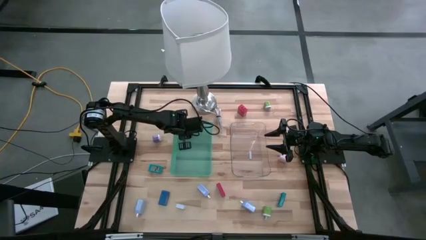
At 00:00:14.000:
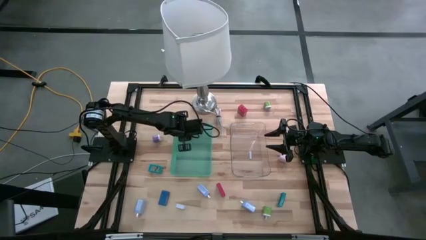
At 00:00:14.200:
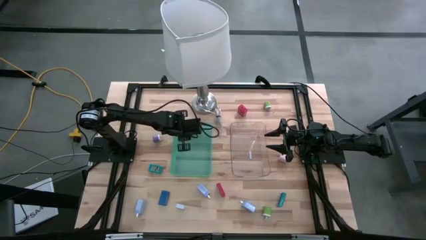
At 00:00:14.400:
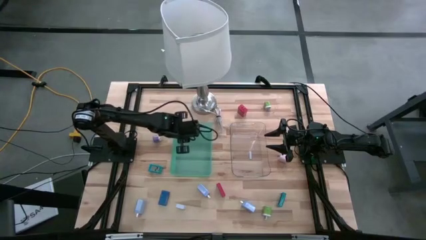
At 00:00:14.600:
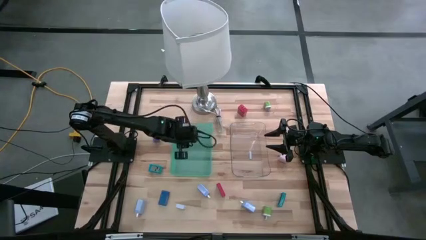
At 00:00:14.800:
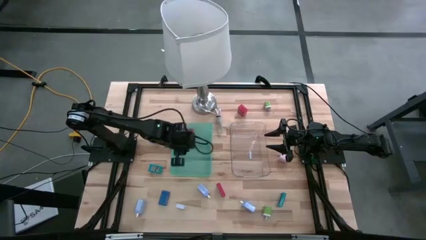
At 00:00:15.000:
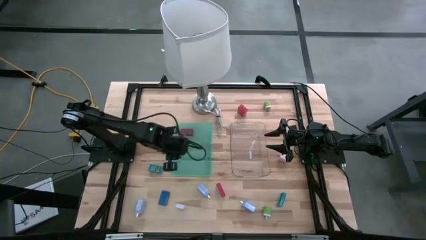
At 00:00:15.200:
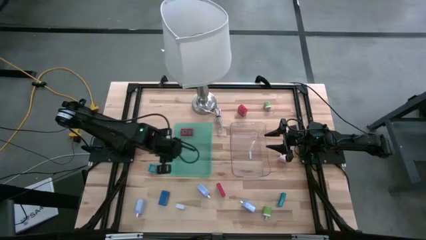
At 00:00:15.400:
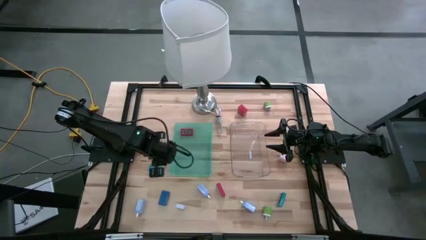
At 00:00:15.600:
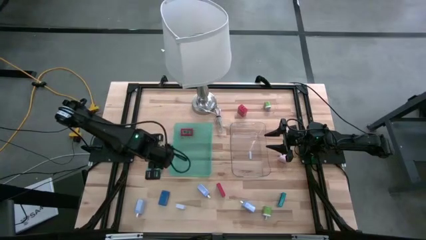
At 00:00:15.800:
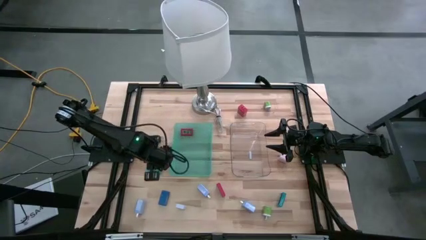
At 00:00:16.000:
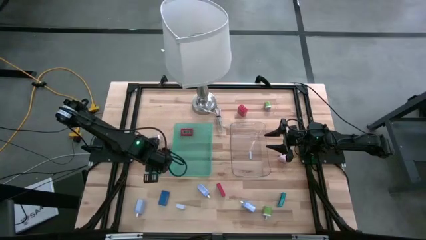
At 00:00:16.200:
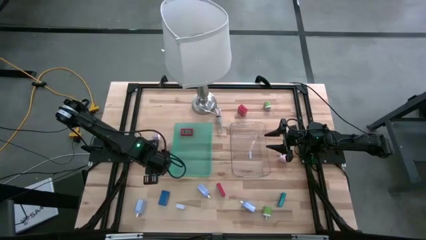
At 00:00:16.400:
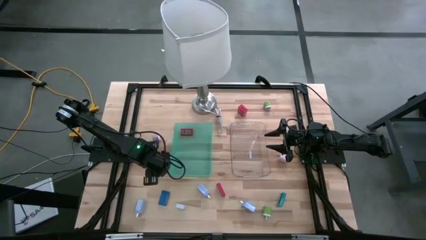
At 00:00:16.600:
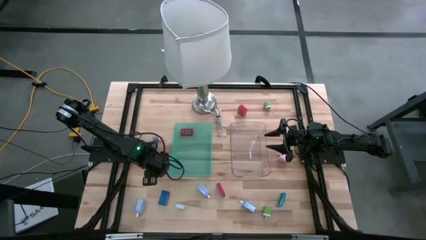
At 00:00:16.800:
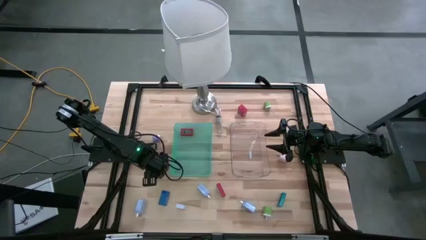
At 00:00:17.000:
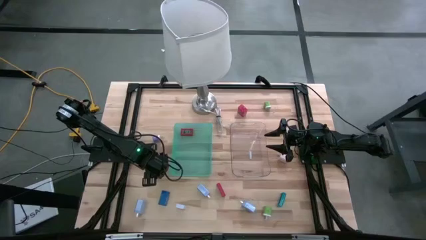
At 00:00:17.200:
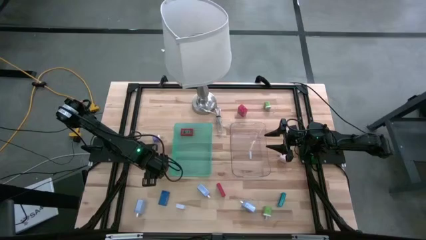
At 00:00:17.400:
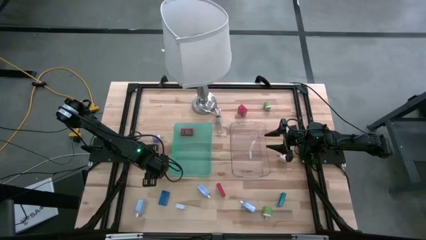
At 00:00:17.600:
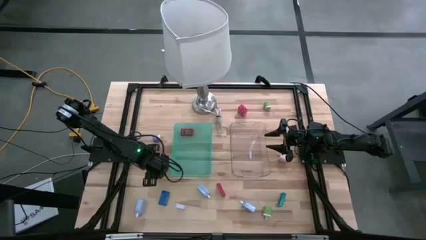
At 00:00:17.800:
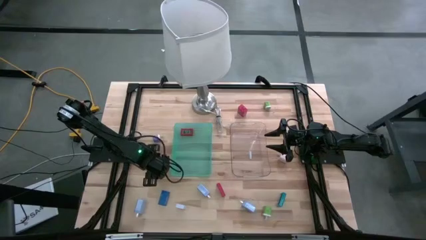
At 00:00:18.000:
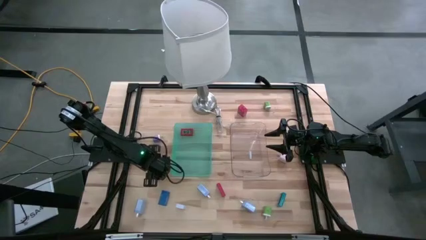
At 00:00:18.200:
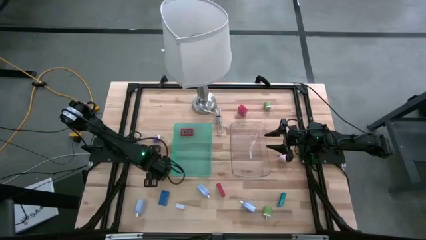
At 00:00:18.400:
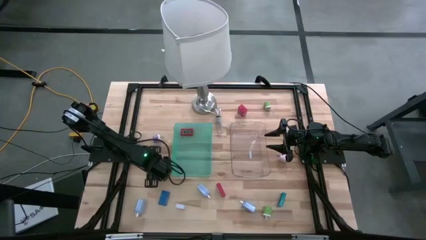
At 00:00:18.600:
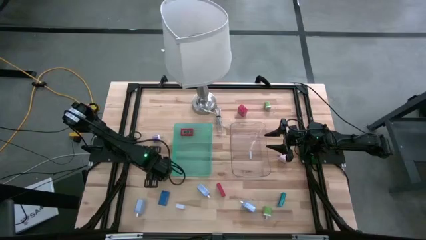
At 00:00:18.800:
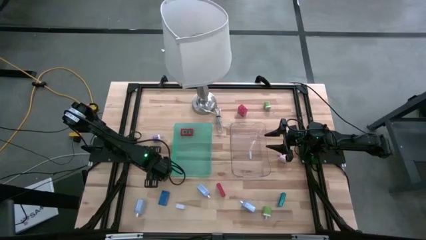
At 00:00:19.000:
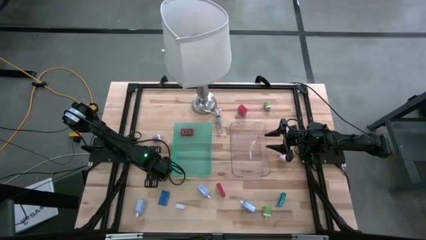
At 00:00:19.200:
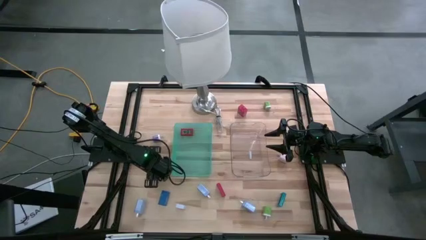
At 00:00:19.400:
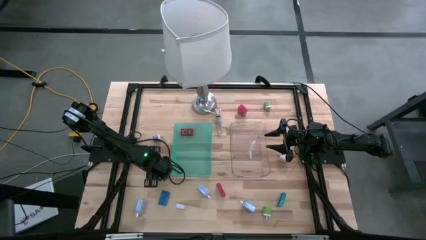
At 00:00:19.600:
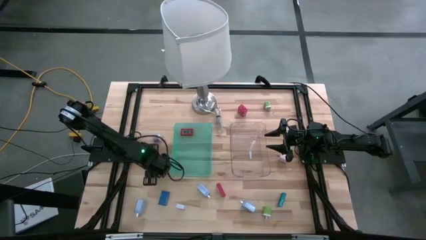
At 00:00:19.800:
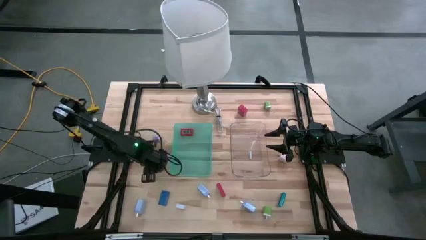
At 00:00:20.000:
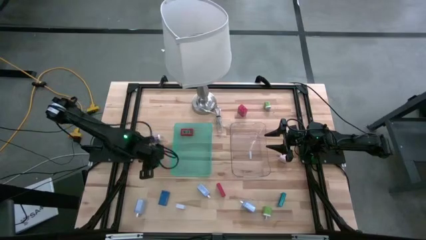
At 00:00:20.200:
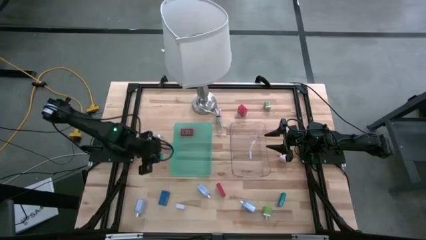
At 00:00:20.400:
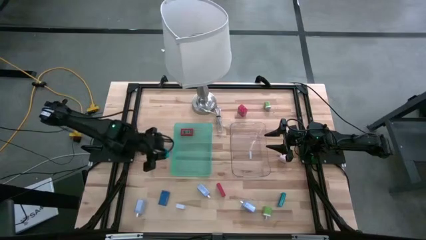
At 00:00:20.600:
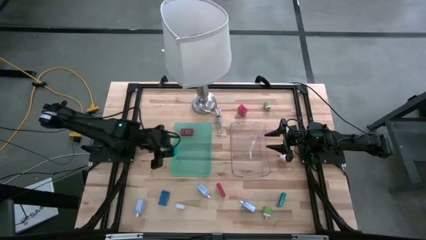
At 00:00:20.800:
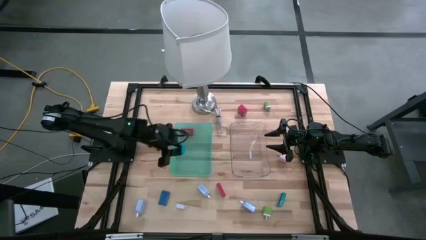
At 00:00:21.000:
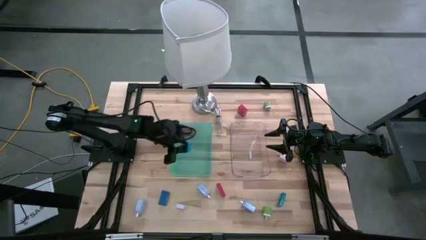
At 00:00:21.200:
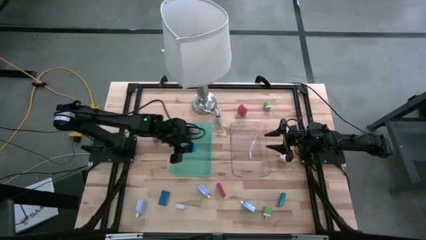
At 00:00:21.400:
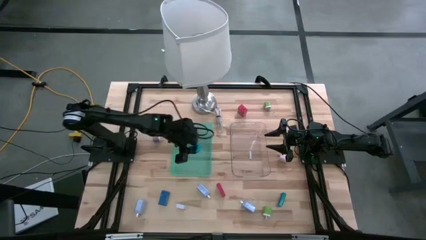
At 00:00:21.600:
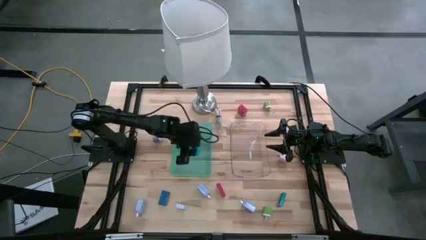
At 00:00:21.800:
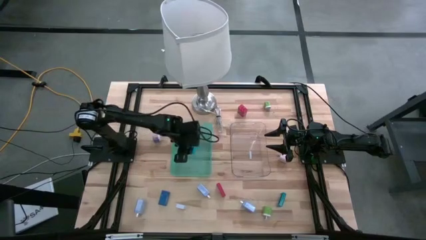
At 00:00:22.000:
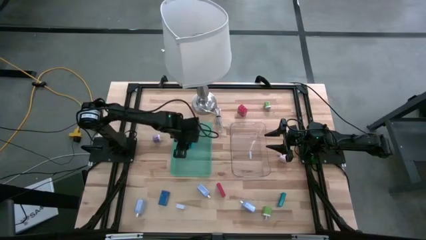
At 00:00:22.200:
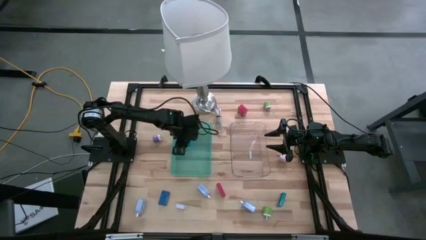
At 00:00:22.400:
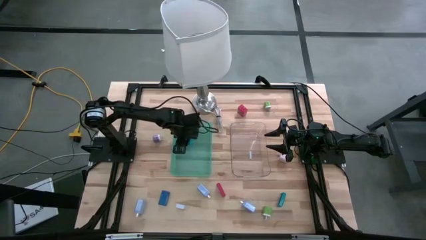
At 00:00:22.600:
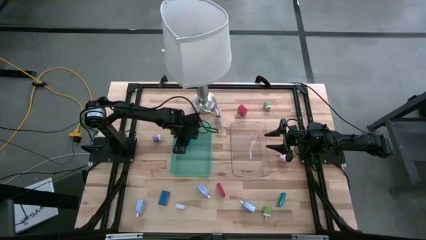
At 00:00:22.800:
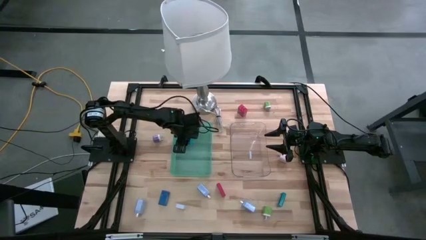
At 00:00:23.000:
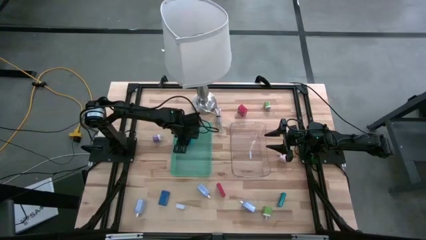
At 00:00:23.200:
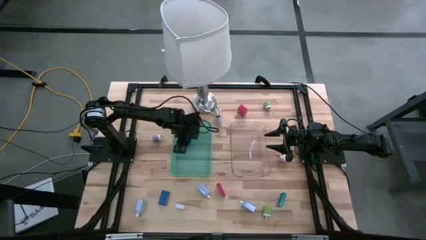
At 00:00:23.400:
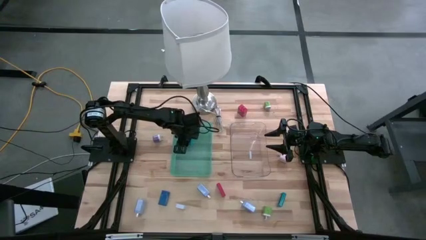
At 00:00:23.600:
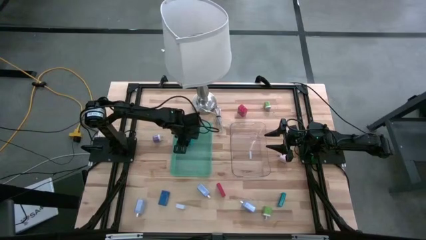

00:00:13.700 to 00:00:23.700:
Task: Pick & Place Office items
Put the top light blue digital clock into the green bin
